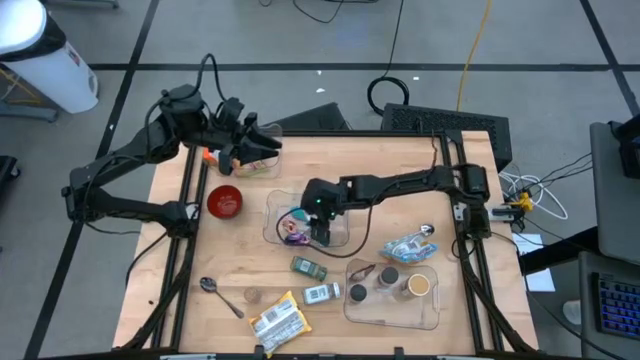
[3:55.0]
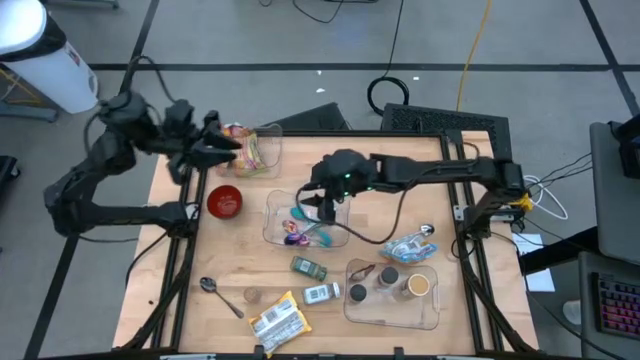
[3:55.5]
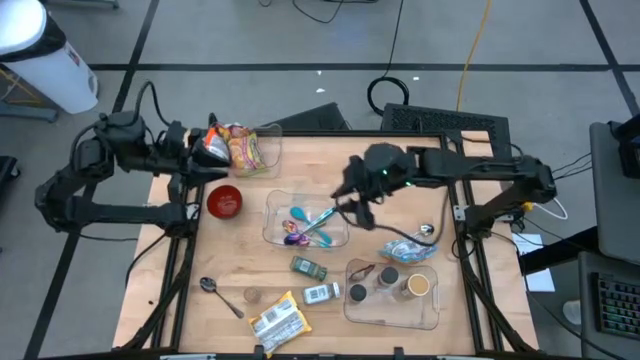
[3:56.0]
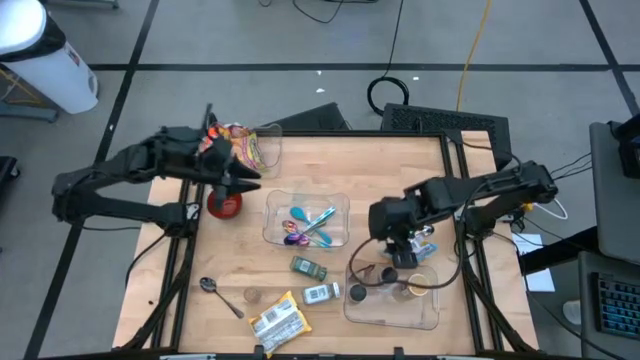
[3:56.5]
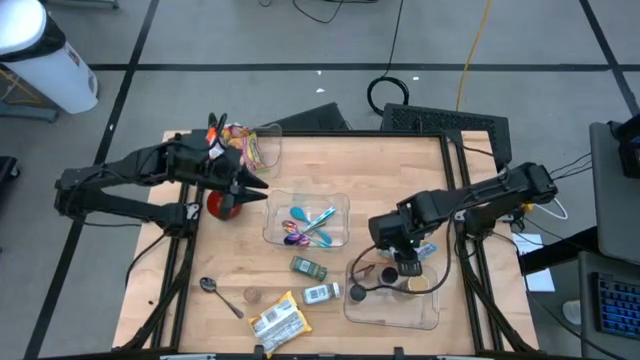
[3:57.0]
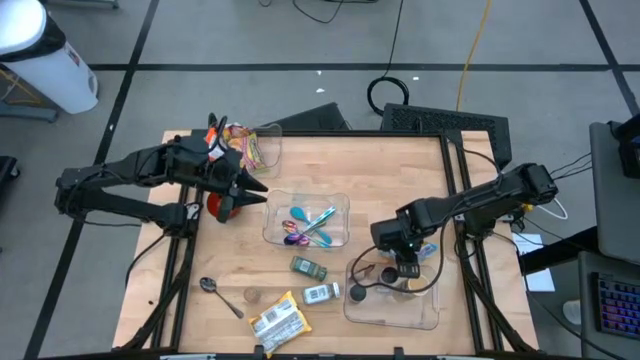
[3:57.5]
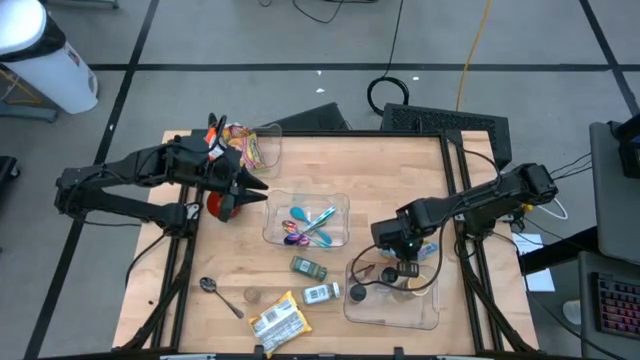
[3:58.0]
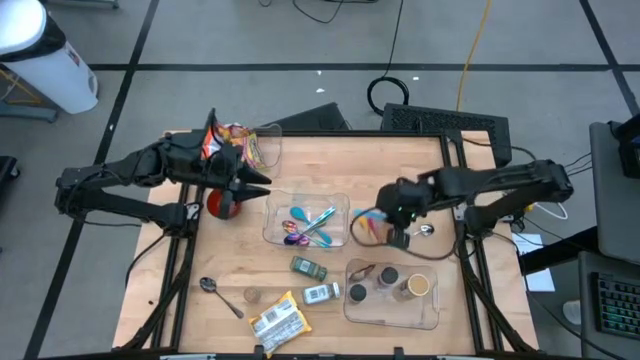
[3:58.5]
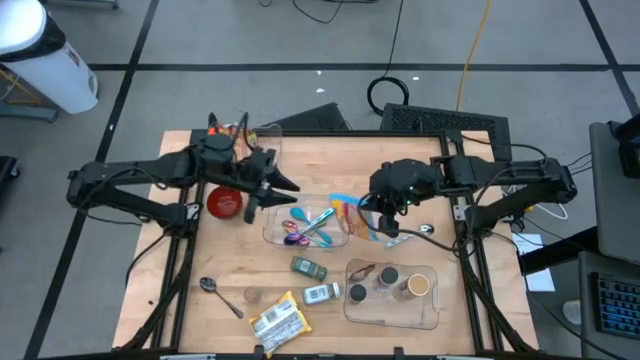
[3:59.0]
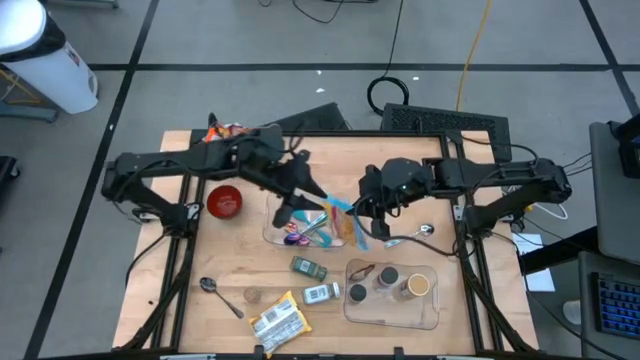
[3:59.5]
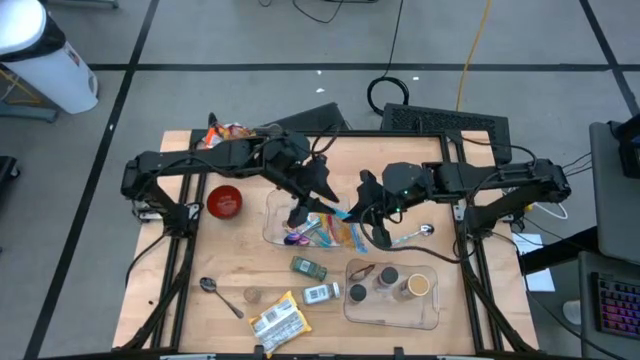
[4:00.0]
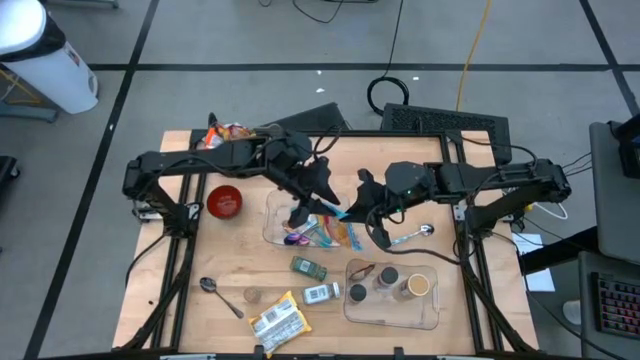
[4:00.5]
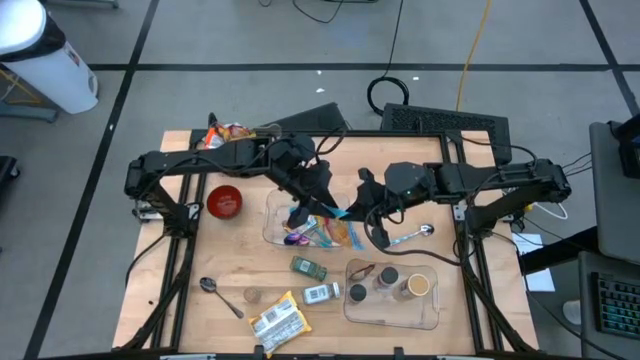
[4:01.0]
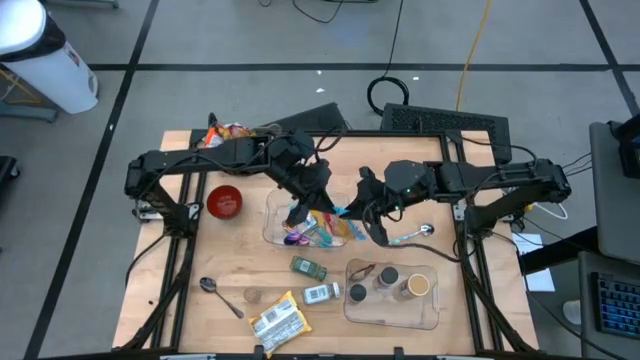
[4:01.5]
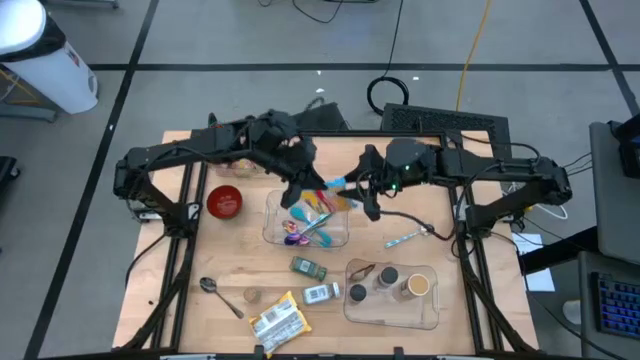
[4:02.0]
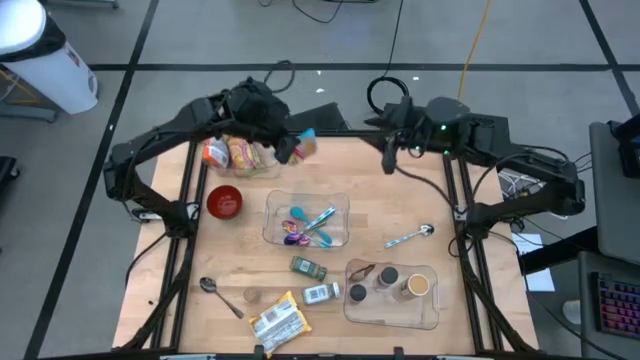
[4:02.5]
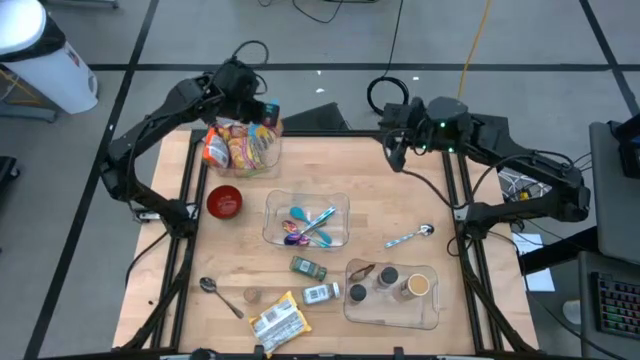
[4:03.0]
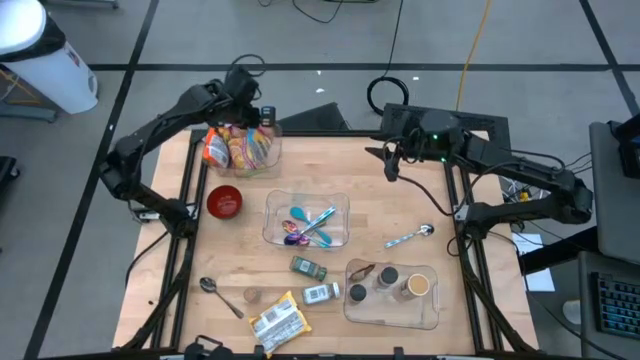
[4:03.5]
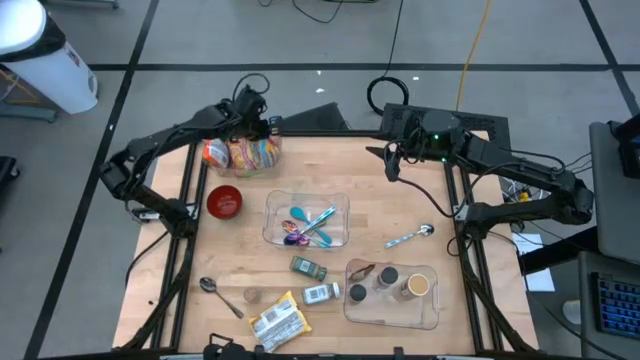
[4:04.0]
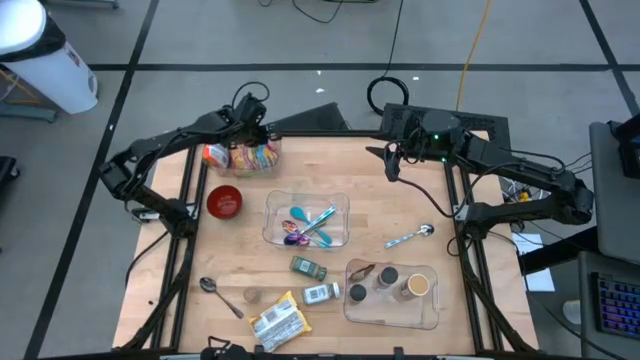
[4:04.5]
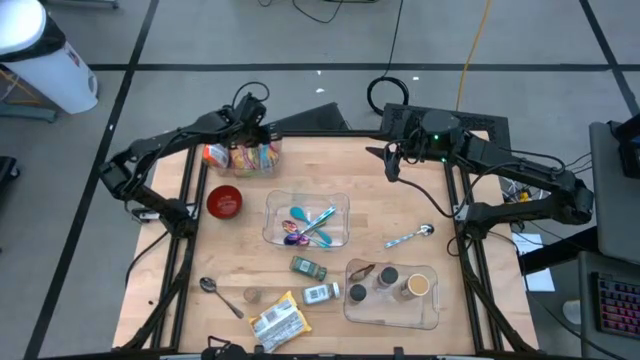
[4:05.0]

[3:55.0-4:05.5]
Task: Pick & Place Food Item
Put the light blue noodle pack into the top transparent bin

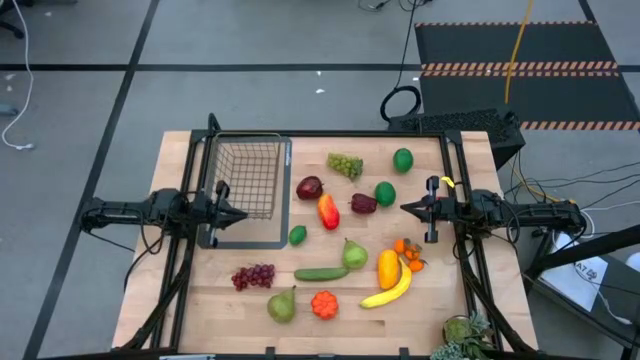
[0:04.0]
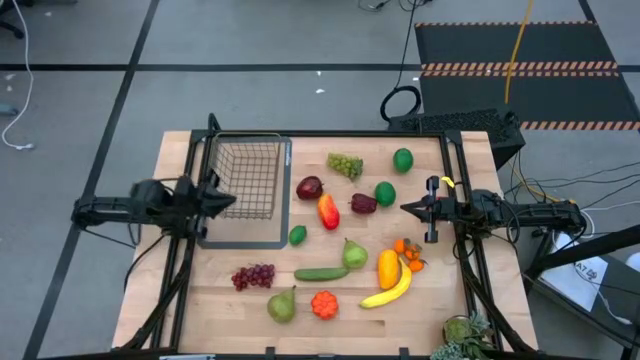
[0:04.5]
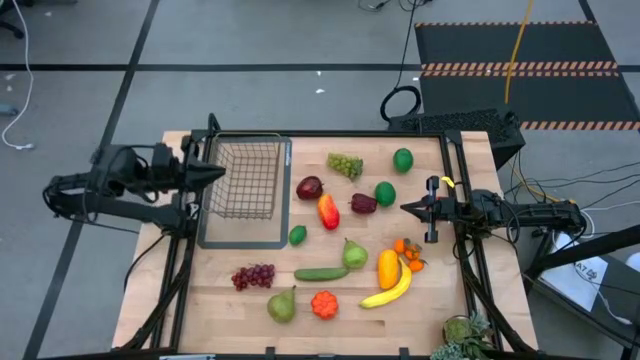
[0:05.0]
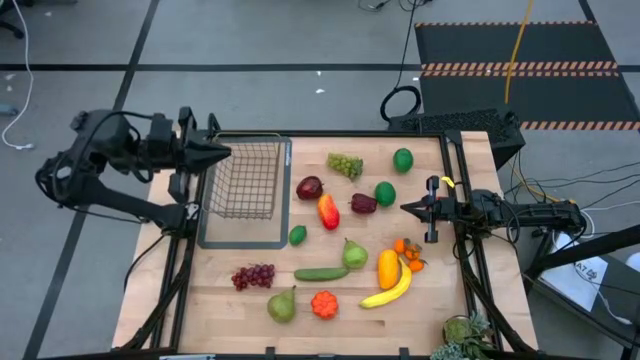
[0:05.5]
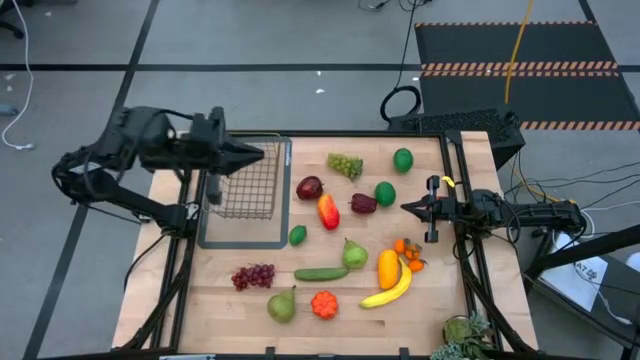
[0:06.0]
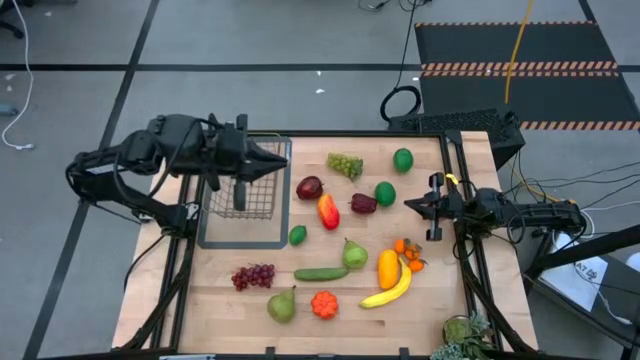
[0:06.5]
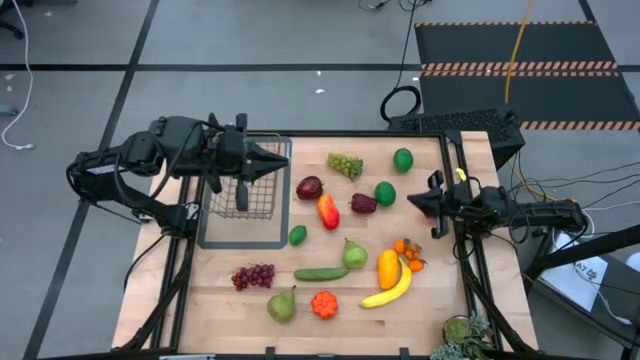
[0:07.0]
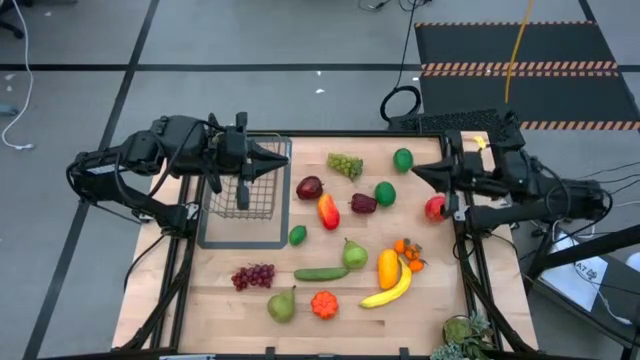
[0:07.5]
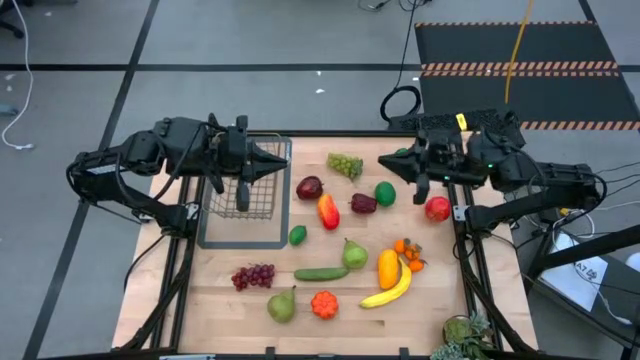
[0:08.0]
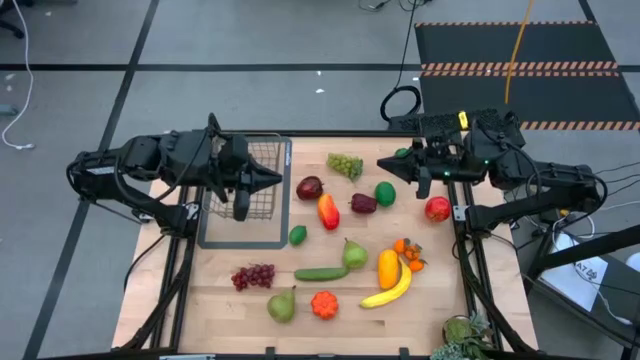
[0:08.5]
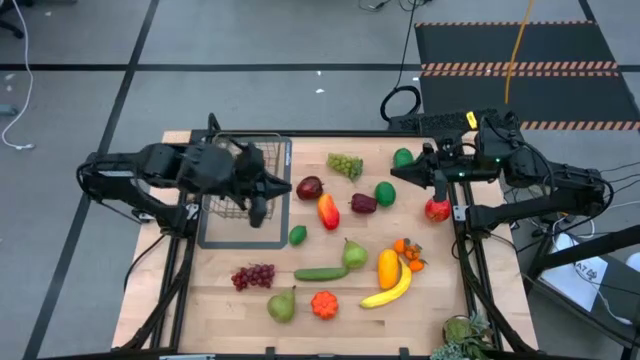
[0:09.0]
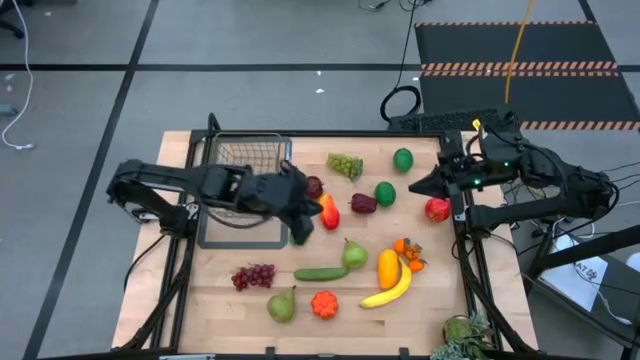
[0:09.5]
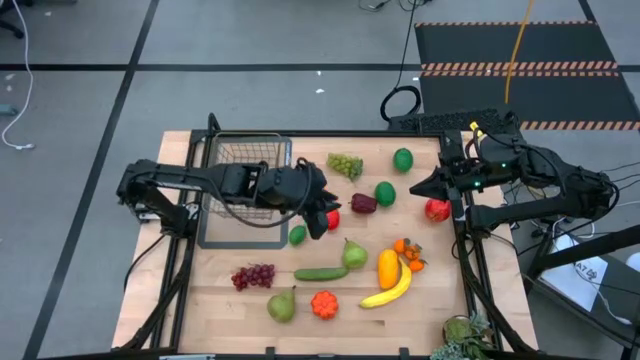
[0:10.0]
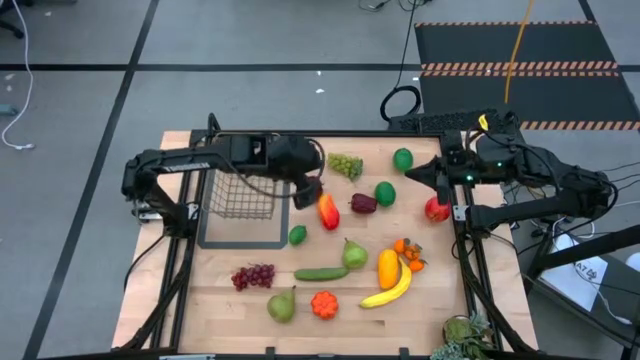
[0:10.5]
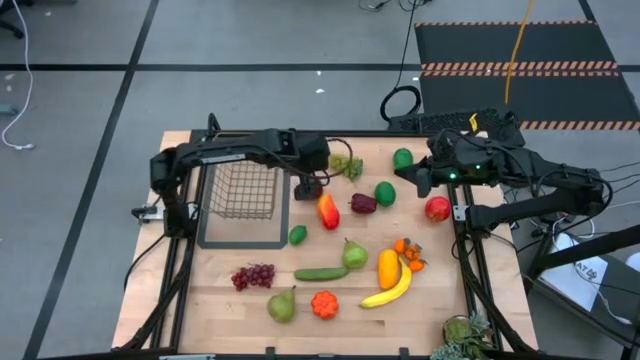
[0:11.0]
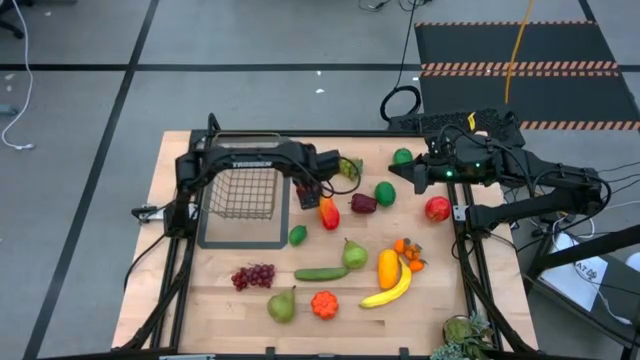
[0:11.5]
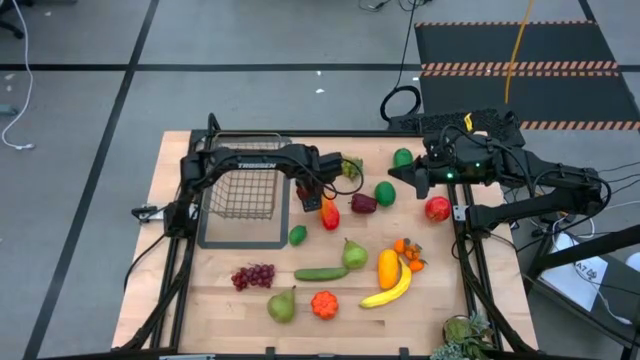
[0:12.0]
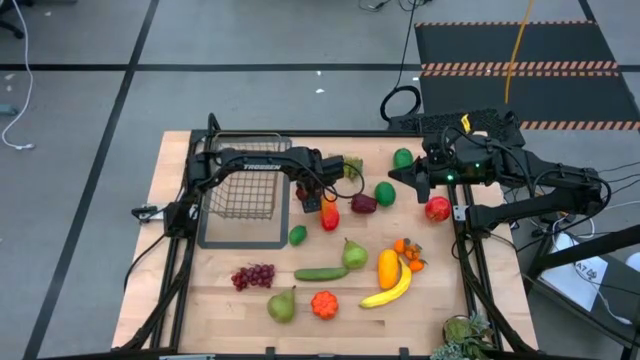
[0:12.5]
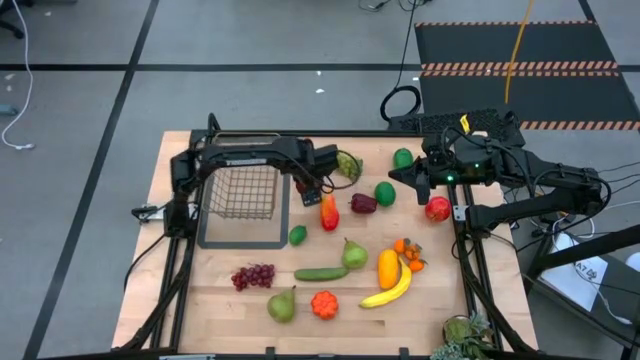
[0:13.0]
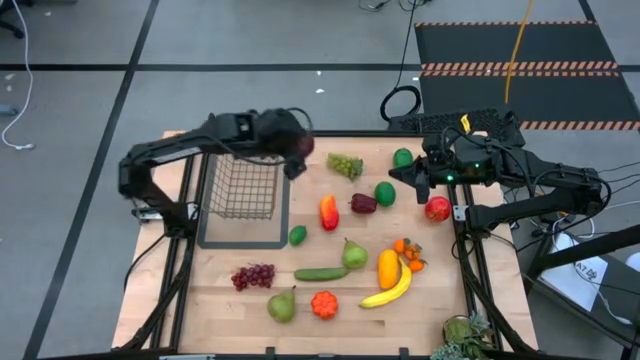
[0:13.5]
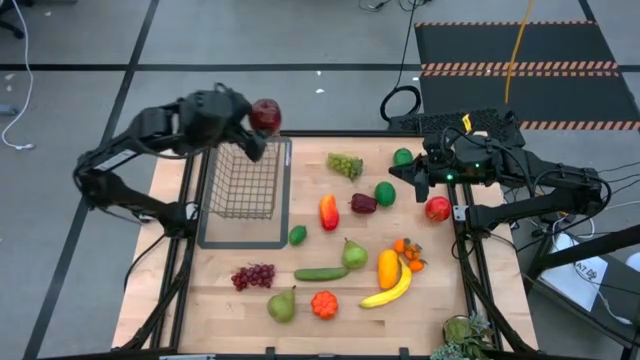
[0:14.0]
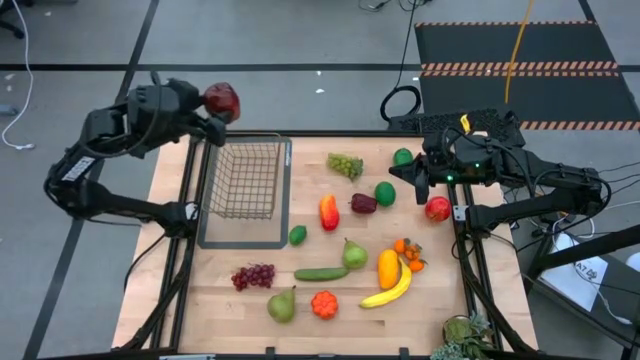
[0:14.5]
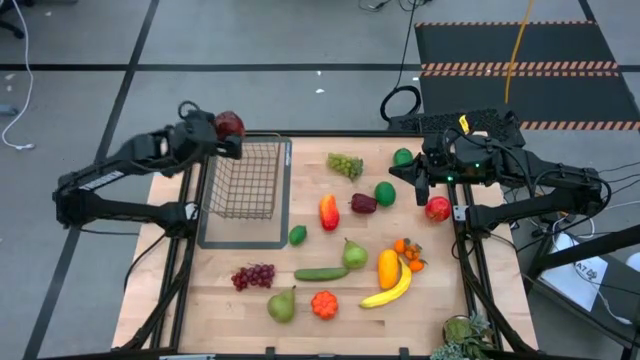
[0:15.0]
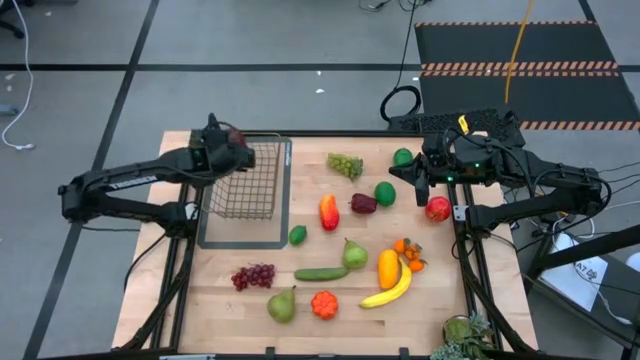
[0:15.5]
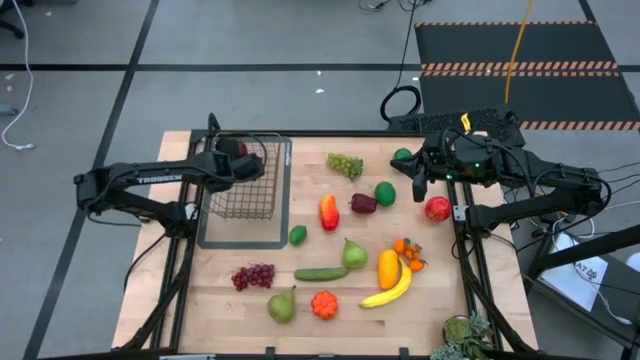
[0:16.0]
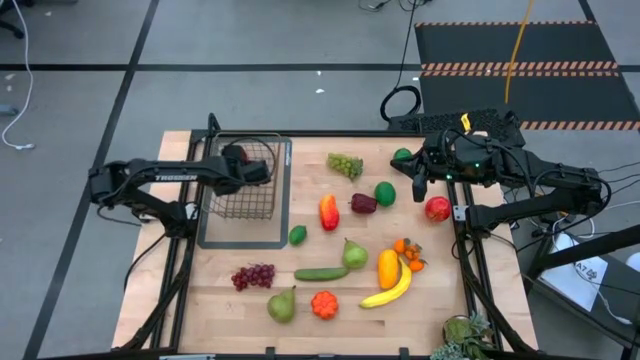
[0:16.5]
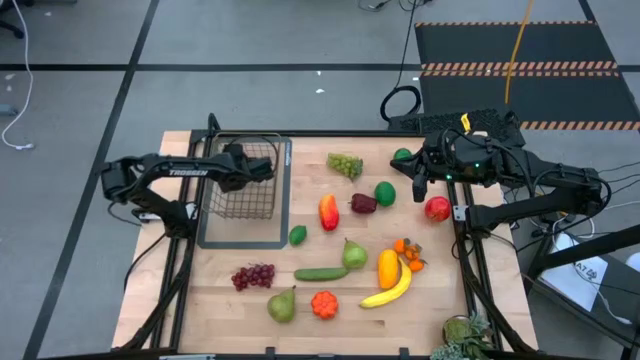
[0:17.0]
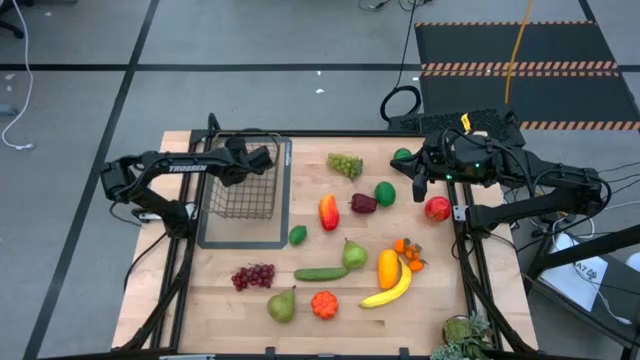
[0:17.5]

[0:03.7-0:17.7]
Task: Build produce basket
Put the left apple into the wire basket
